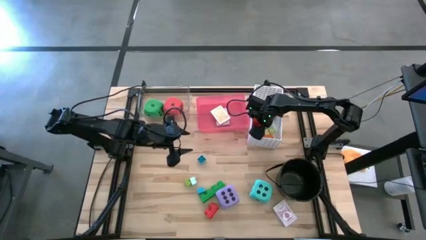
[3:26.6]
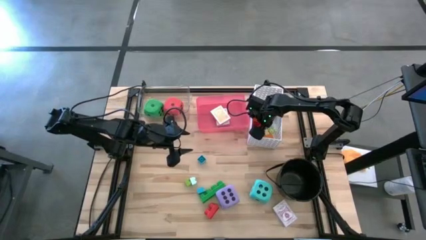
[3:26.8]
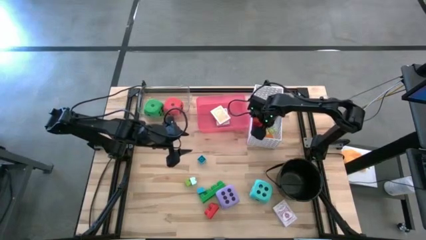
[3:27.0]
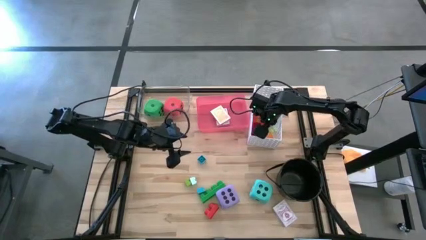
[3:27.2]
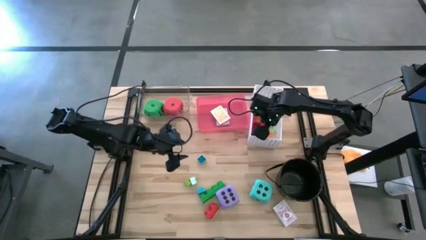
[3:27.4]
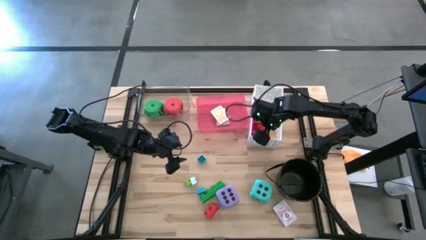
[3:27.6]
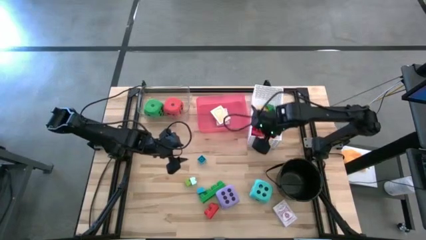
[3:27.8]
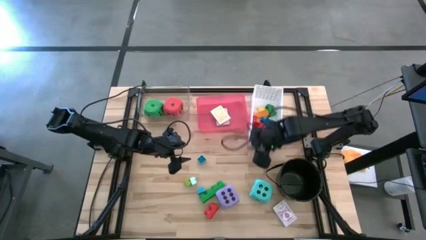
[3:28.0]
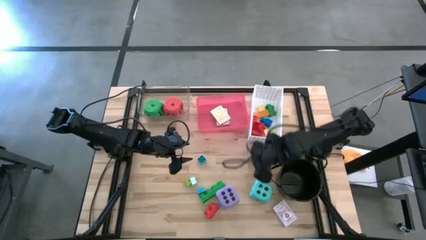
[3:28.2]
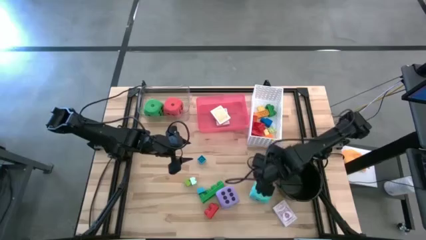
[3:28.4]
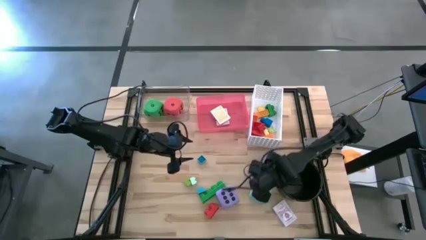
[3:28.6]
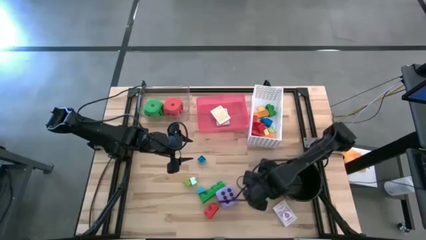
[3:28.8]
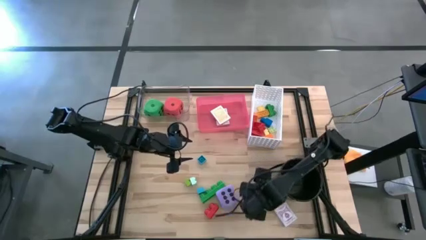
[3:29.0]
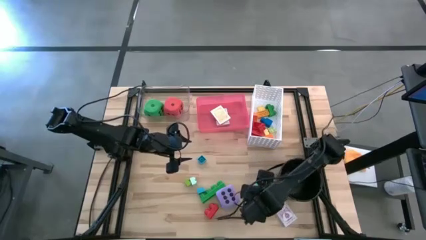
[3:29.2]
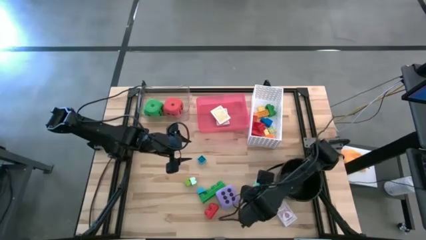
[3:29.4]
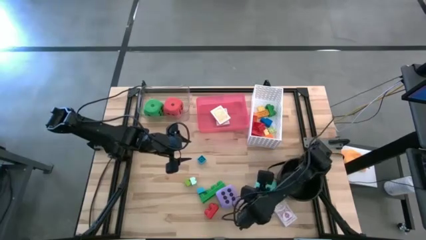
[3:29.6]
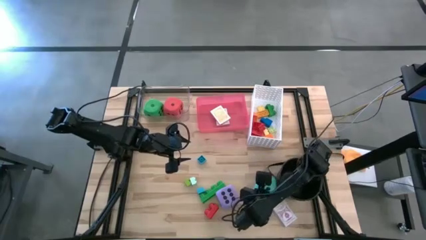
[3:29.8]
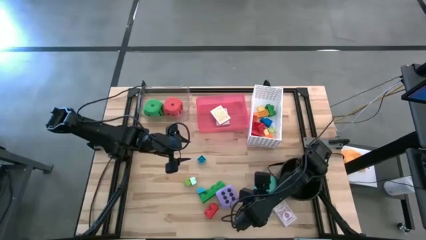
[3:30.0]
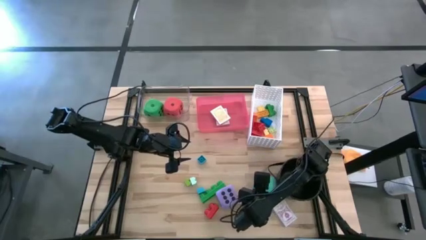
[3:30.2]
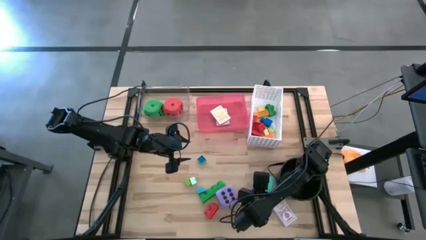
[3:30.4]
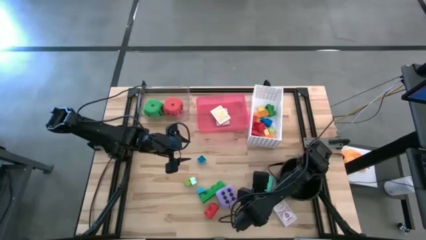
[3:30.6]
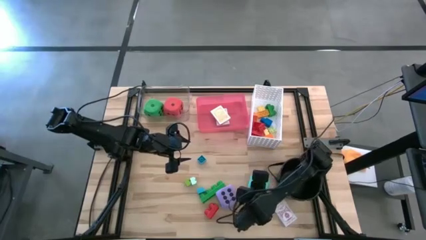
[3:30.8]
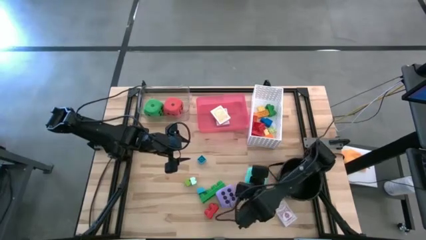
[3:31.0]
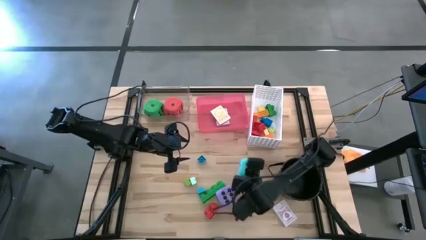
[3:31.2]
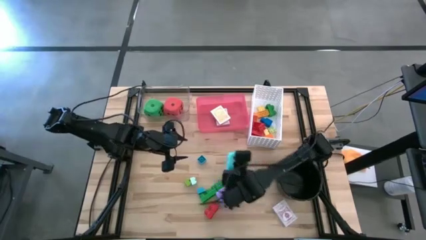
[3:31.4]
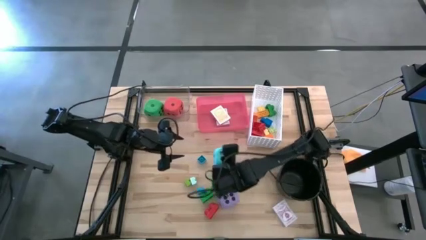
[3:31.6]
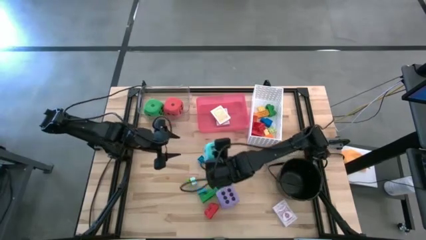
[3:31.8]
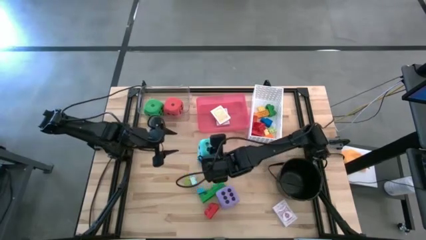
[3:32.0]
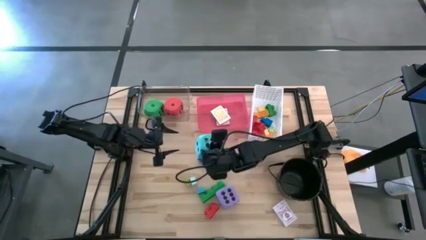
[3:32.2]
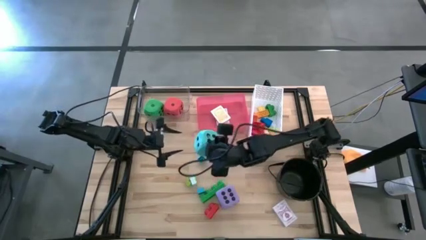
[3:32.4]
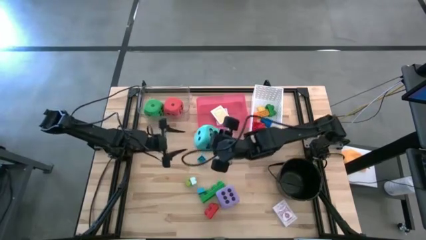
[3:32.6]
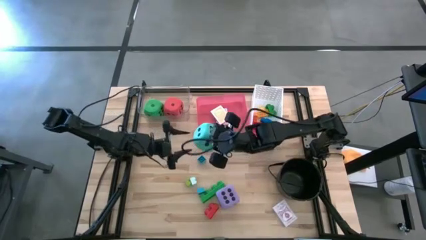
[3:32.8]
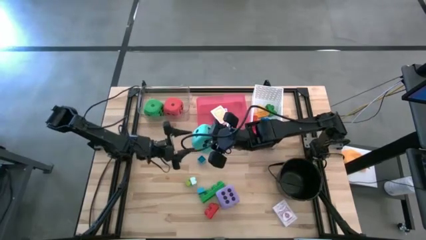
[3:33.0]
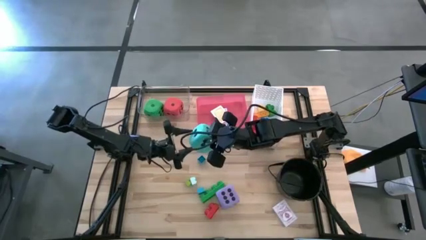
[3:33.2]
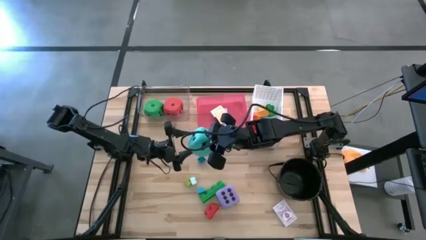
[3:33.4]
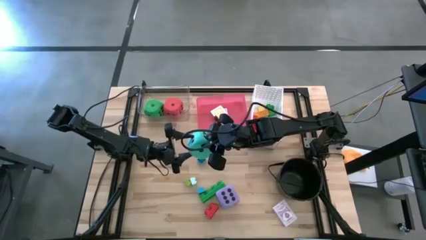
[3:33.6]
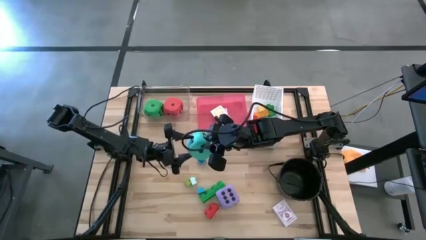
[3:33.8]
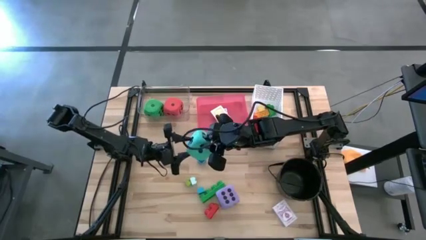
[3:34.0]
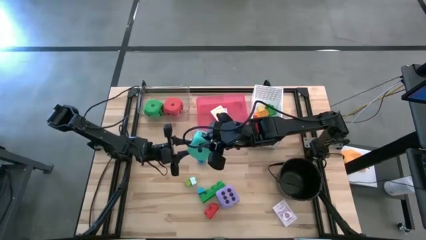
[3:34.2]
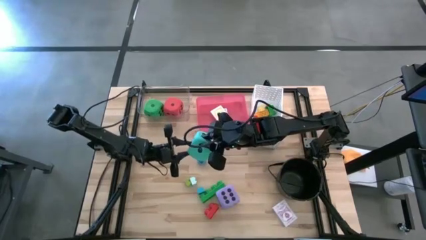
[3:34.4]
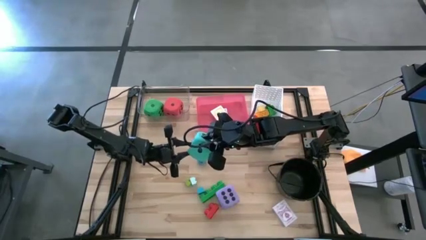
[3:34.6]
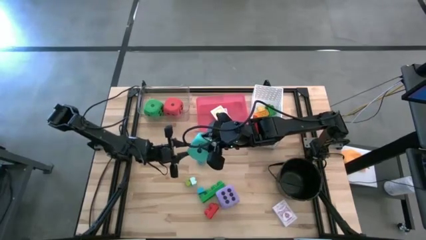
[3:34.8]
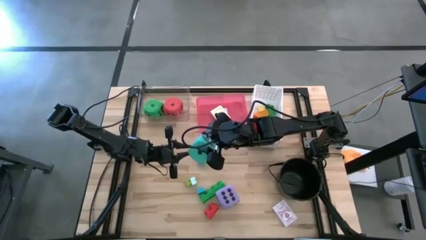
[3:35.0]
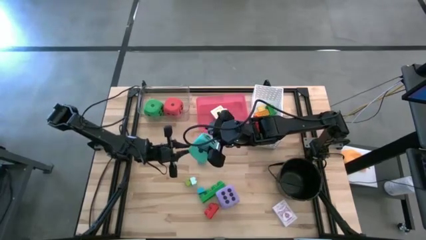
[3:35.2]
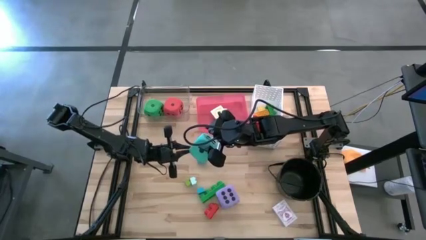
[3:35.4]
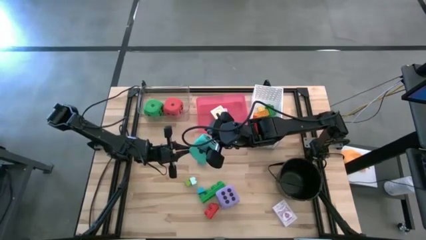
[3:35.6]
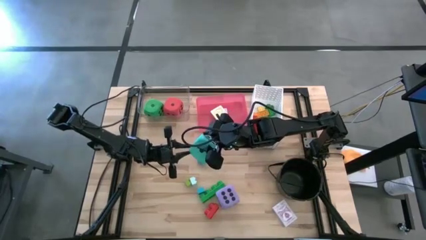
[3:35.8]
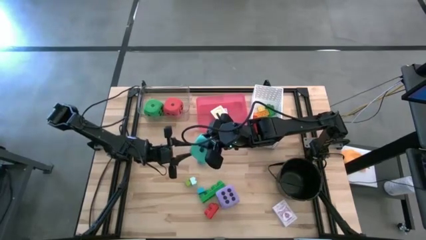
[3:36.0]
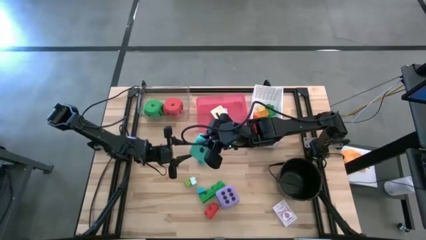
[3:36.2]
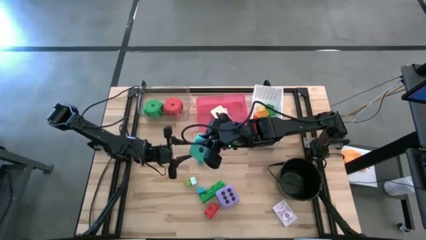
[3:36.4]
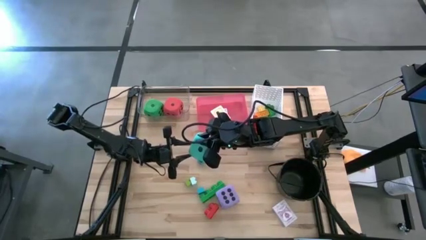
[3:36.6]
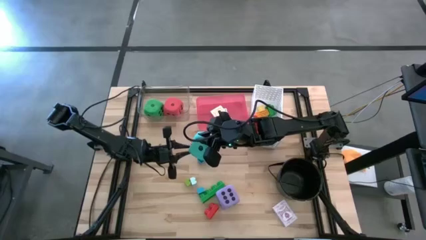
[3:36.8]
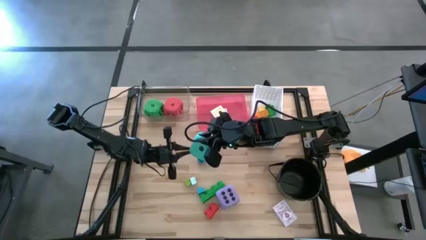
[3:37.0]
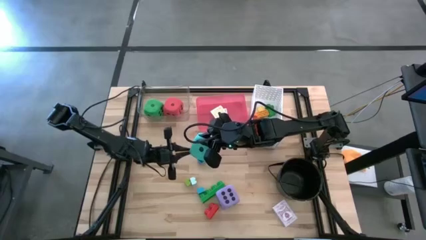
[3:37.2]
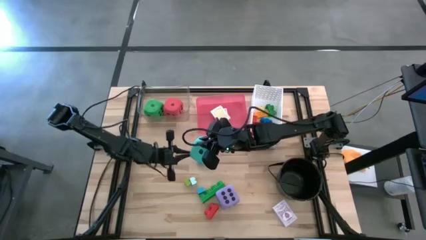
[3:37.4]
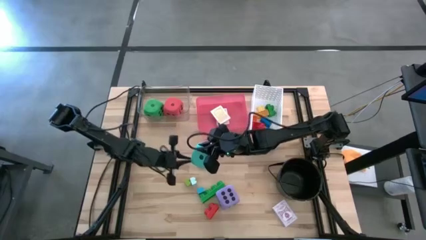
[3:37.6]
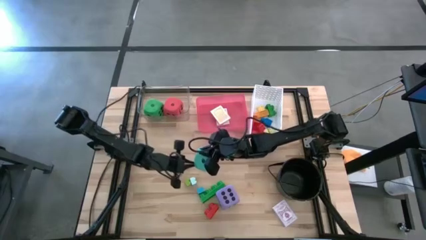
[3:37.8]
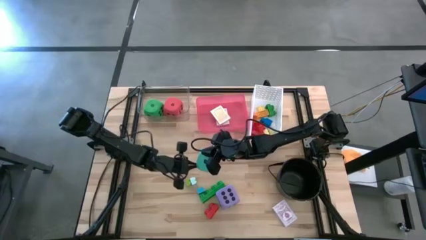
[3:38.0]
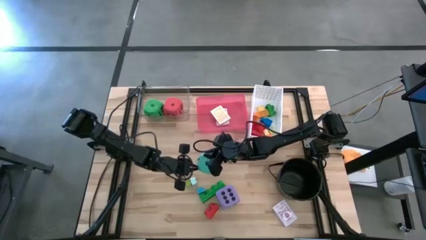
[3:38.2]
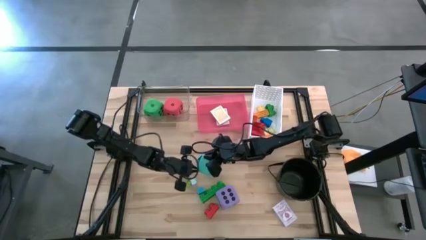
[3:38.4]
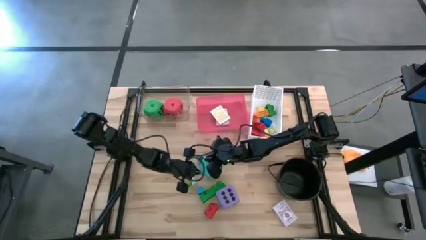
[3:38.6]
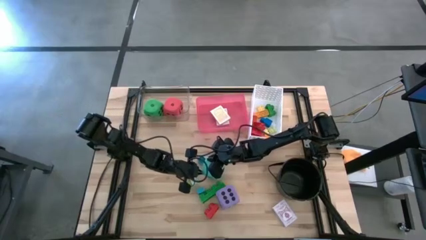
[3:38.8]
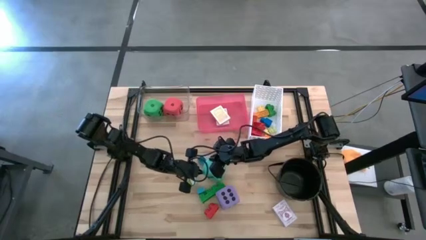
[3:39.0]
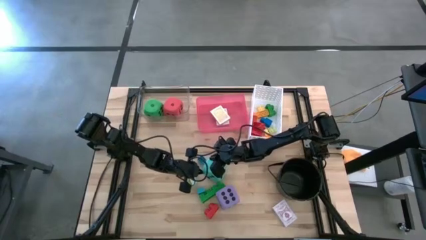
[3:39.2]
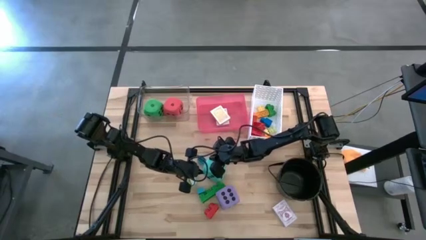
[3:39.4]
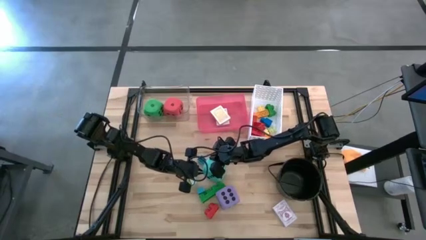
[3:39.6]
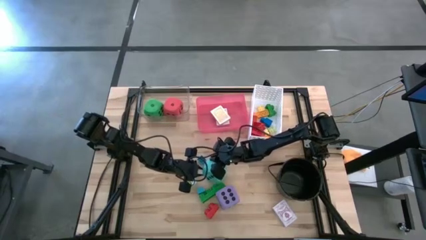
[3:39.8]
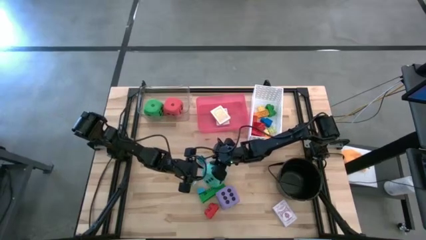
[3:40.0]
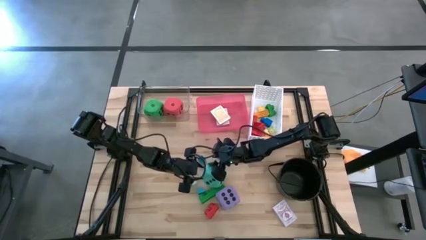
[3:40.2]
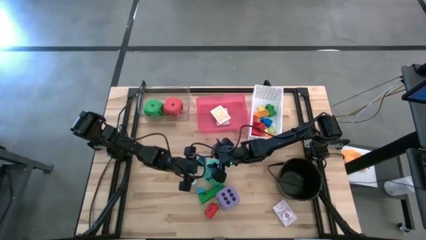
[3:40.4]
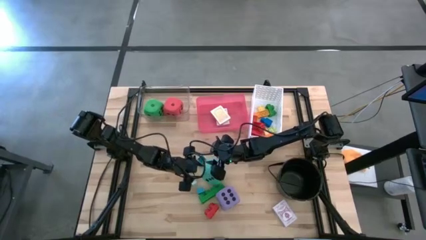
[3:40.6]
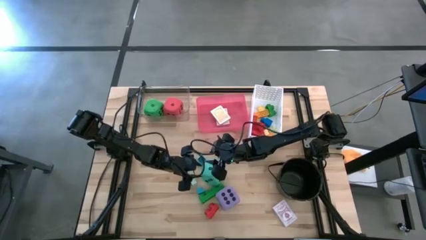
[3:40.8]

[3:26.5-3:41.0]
Task: Pick & Place Toys
Put the blue die into the transparent bin

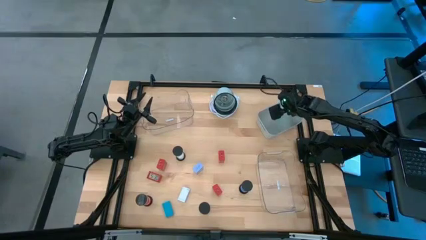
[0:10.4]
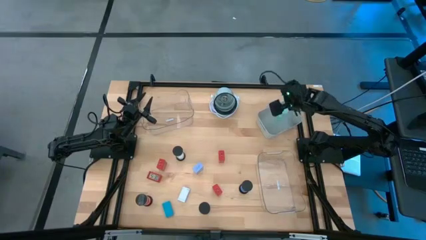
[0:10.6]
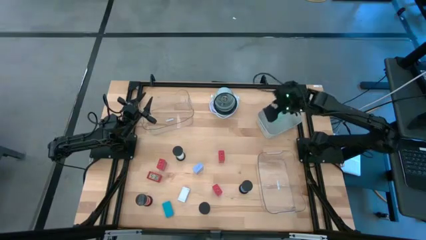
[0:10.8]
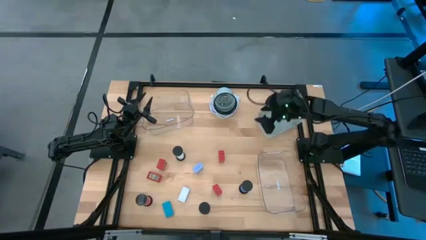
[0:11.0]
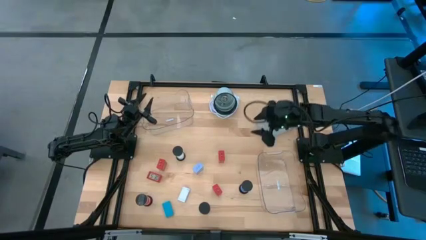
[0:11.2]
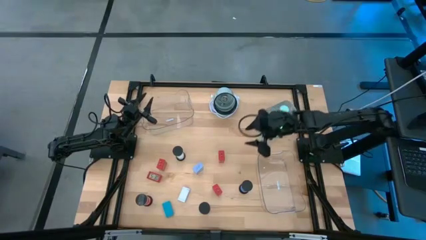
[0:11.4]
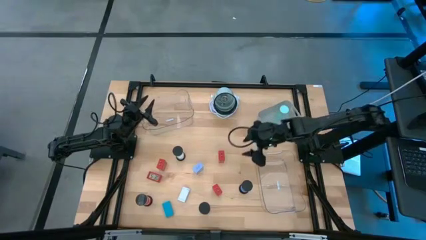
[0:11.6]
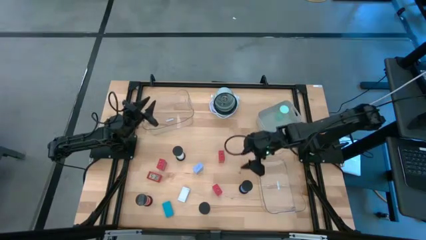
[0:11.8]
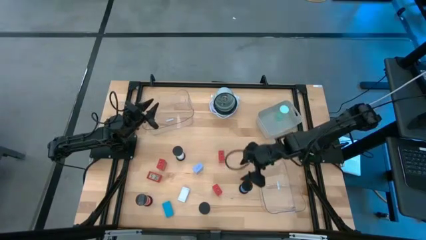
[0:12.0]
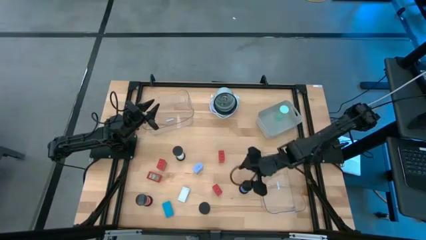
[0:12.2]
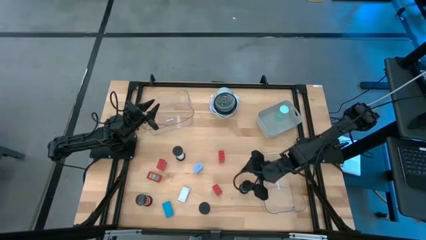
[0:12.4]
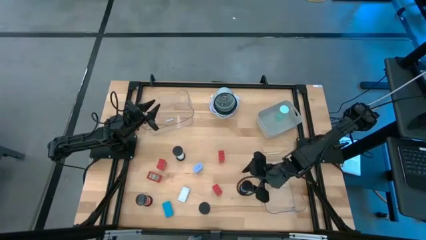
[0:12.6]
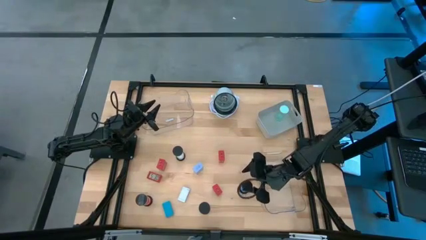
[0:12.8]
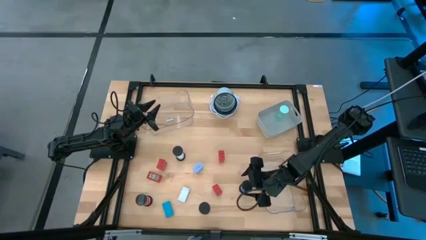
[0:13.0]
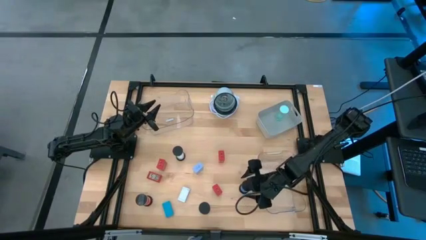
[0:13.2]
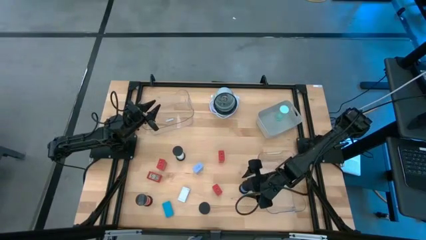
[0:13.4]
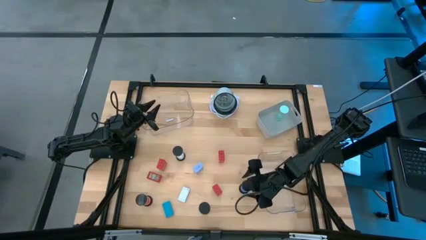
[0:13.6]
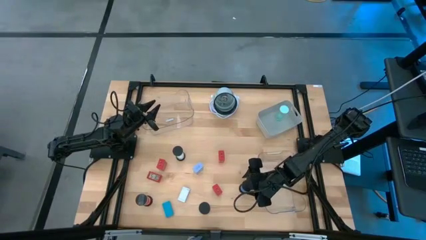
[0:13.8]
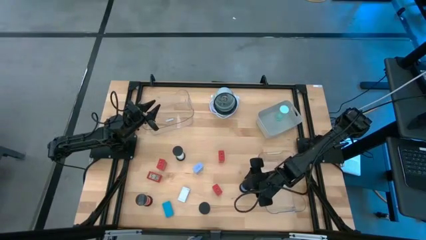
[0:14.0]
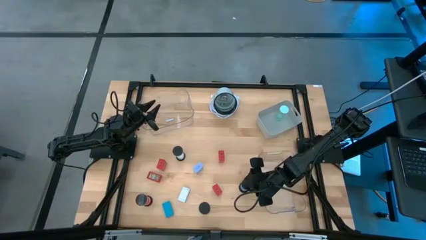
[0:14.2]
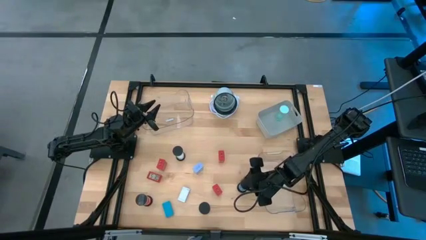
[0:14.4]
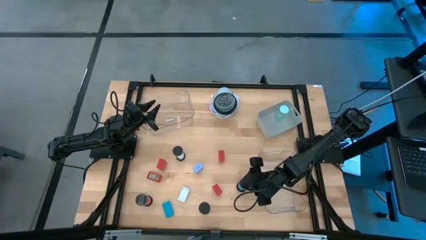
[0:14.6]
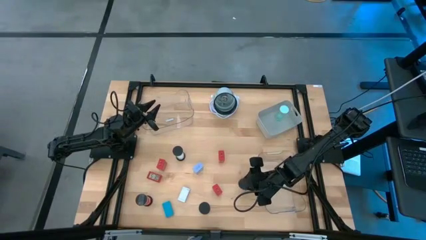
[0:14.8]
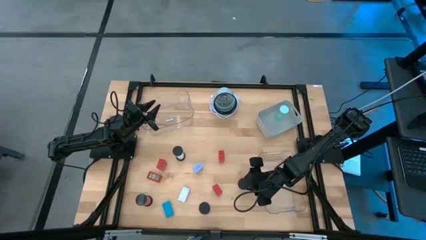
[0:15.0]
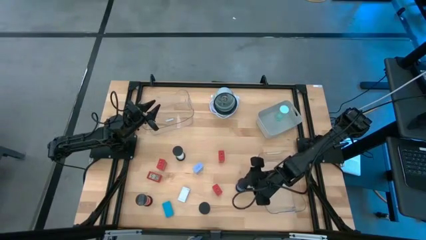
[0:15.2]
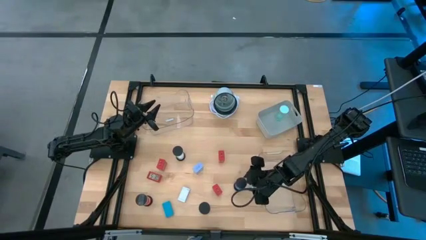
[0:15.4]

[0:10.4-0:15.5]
Task: Pick & Place Office items
Put the right blue hourglass into the gray bin
